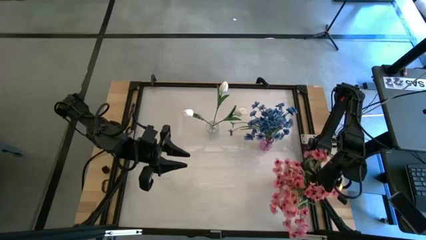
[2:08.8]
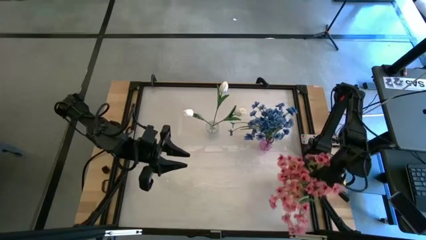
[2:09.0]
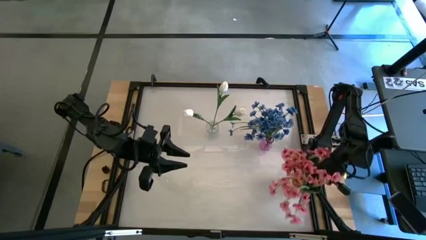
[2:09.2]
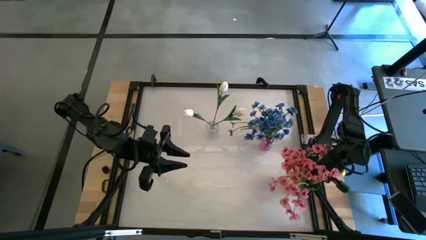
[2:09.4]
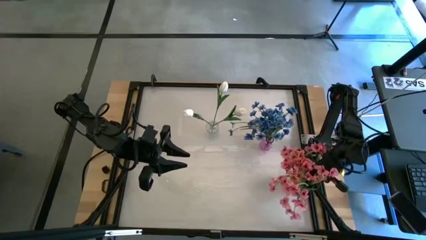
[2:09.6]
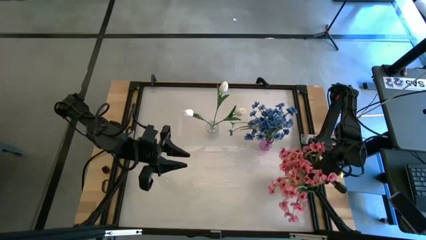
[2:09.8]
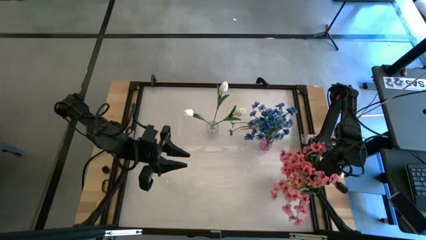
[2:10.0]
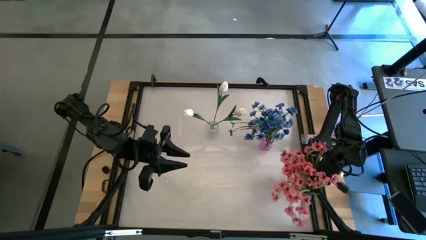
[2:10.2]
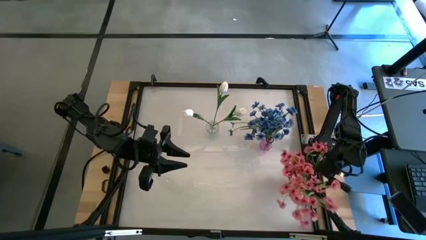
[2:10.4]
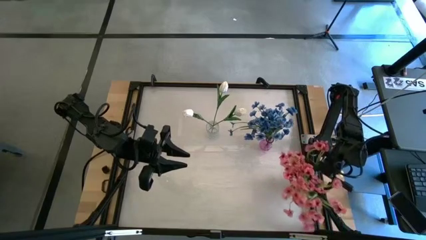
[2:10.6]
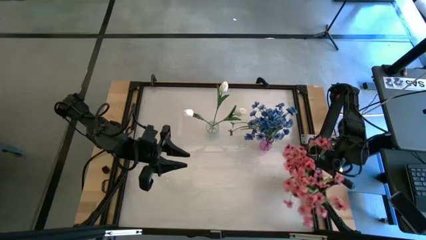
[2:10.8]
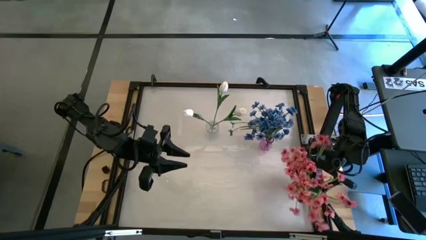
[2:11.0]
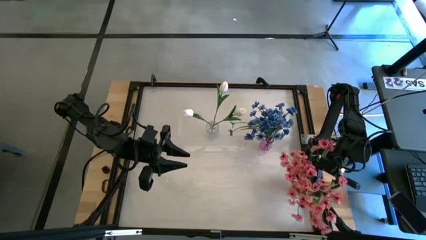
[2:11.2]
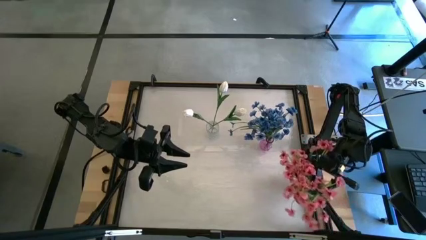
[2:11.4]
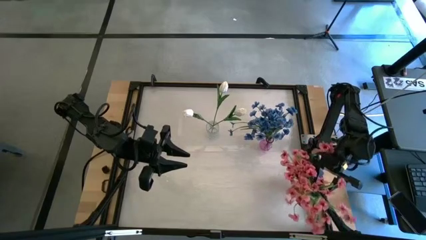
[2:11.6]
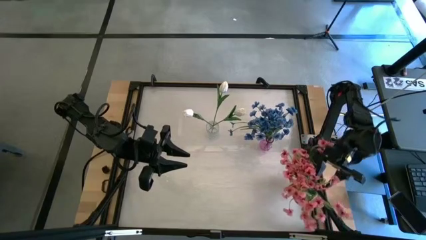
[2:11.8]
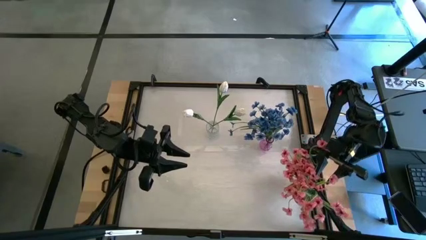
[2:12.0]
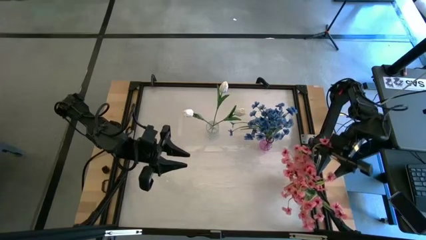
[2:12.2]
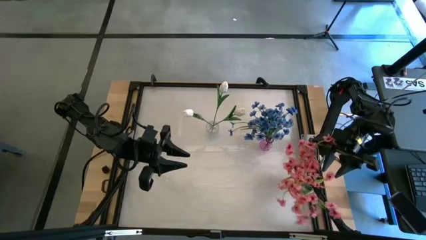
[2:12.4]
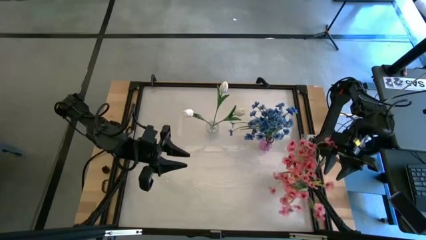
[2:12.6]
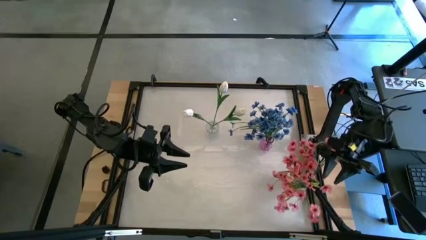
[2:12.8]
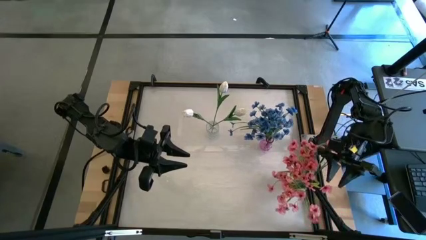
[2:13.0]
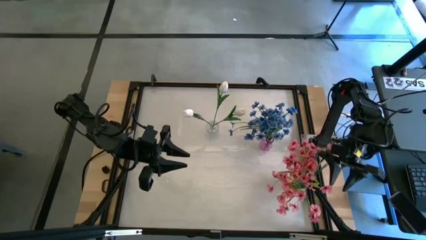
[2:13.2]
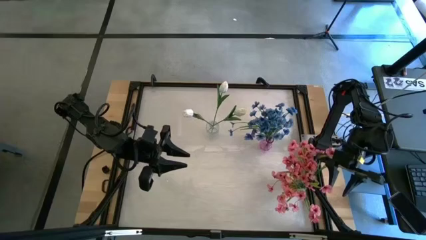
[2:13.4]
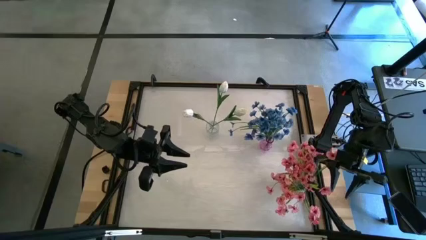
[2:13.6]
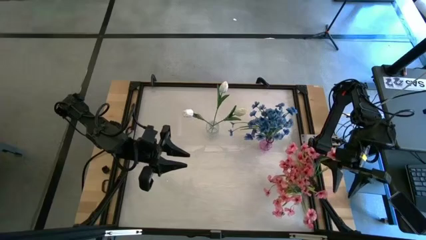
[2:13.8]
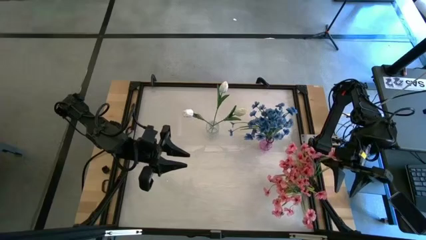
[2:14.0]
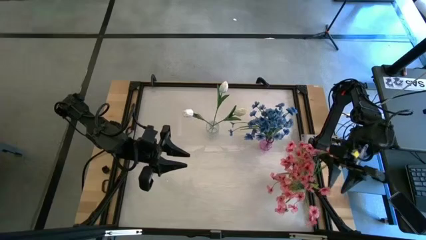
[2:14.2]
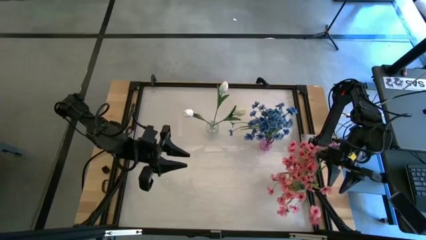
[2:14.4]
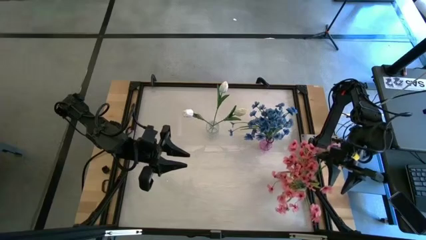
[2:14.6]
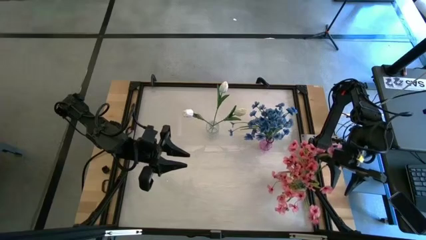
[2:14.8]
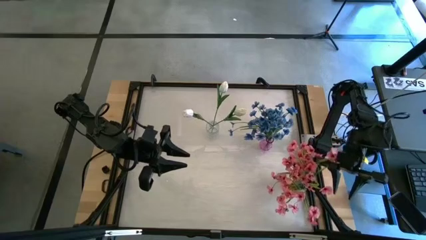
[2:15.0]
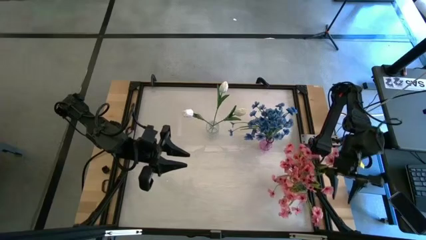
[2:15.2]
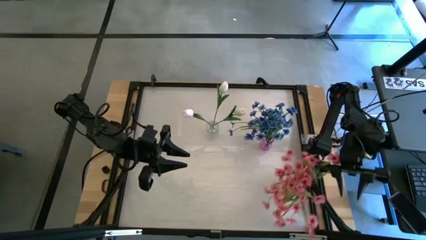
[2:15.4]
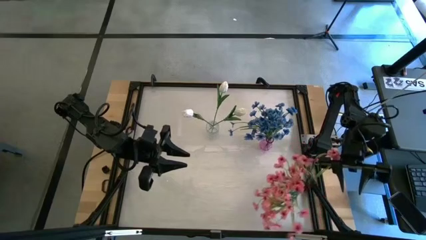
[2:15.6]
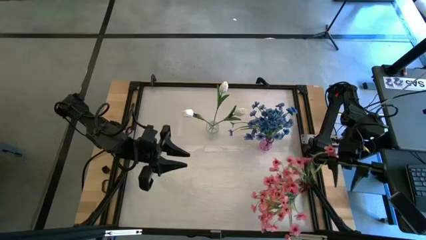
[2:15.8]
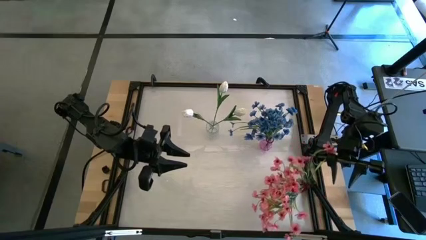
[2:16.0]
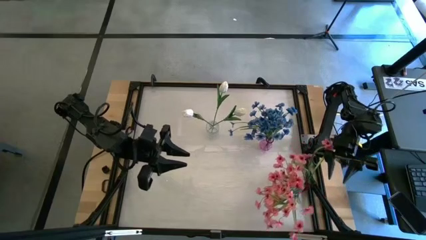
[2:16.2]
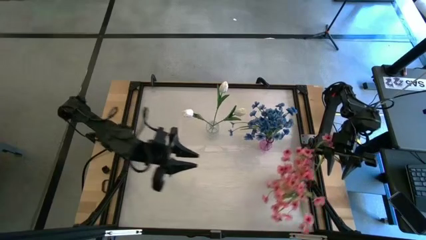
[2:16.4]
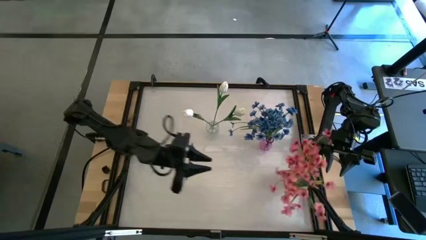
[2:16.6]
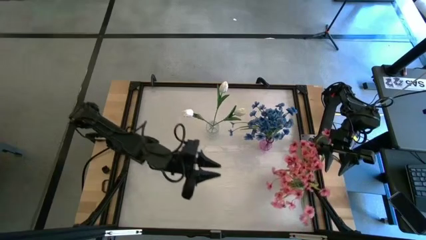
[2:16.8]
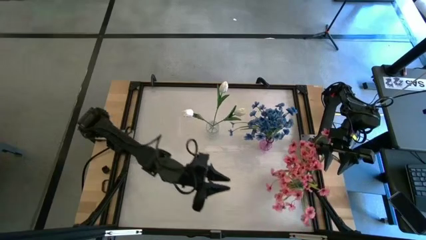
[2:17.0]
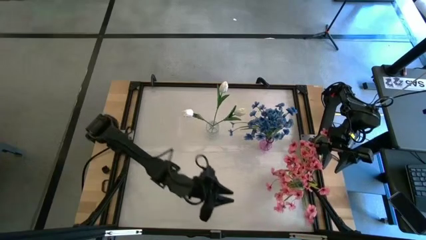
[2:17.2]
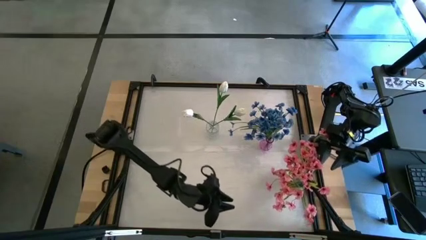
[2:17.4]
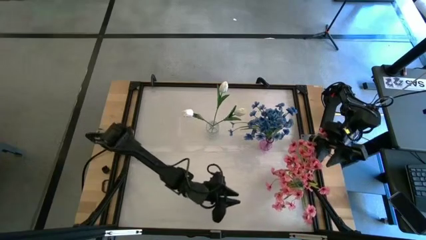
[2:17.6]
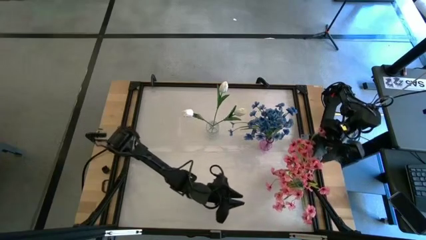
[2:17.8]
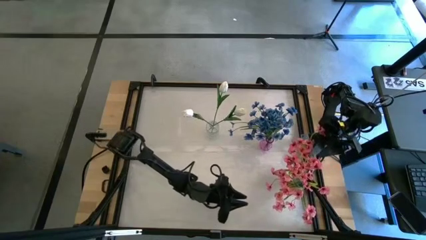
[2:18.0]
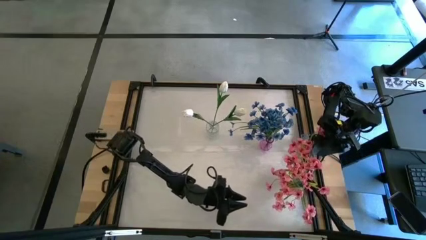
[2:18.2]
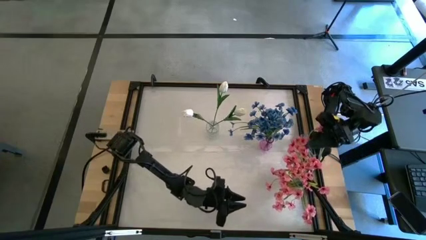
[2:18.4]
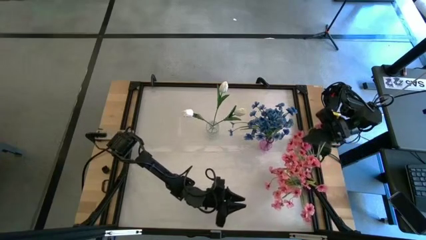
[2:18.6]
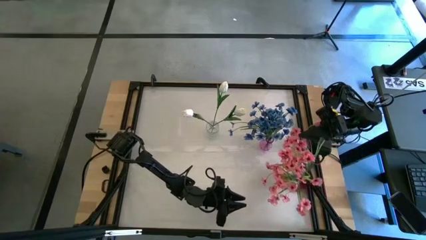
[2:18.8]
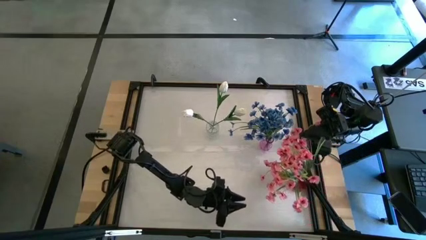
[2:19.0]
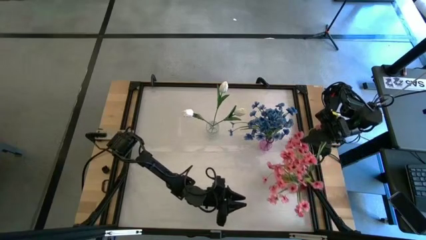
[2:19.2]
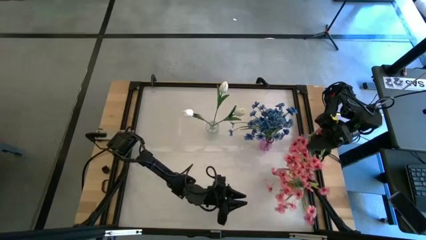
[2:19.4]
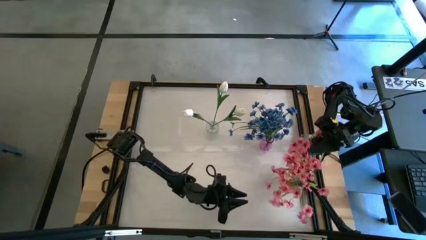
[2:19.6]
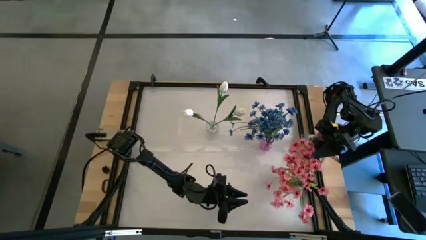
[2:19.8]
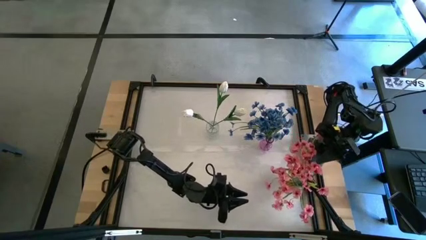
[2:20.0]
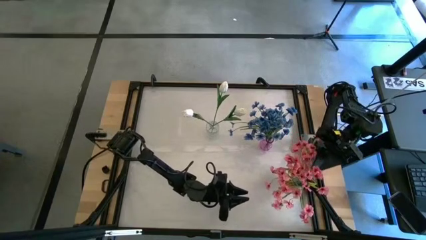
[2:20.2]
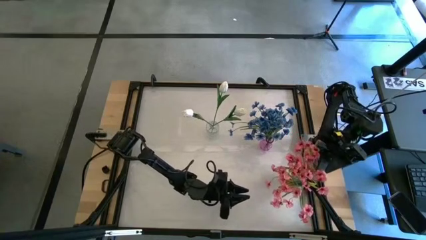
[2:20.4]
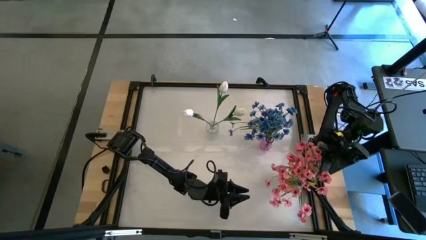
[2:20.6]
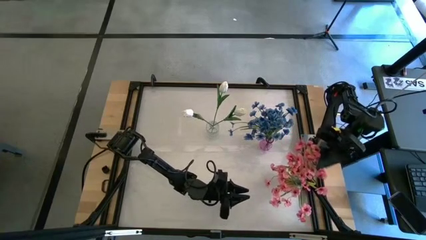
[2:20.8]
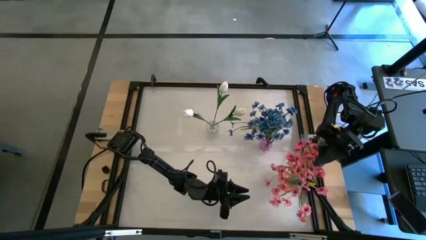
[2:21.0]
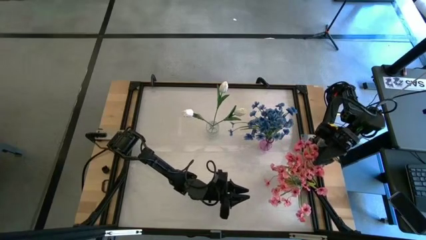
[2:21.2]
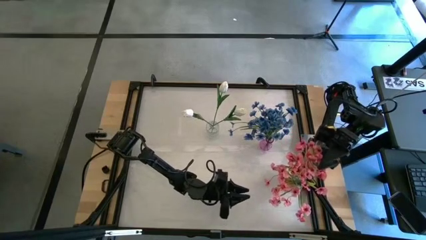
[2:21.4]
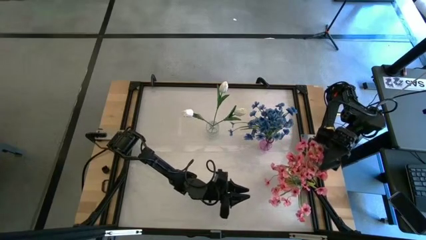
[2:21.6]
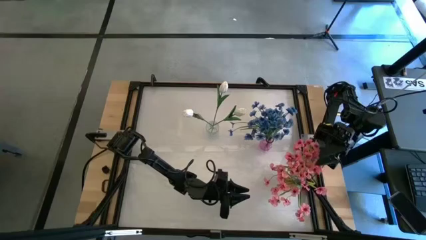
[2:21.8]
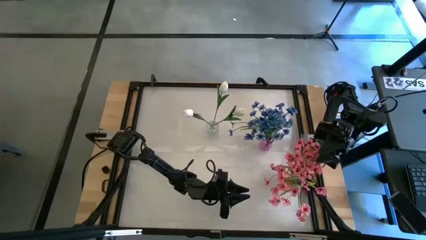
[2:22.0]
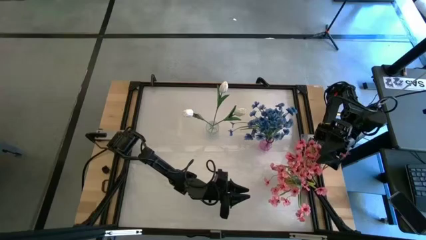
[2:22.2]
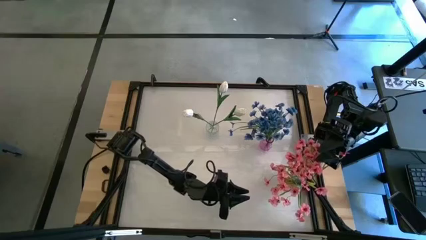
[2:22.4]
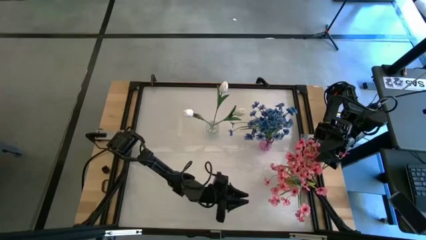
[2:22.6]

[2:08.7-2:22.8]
Task: Sort flowers into vase by color
Put the pink flower into the red vase

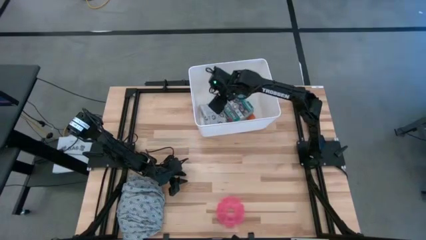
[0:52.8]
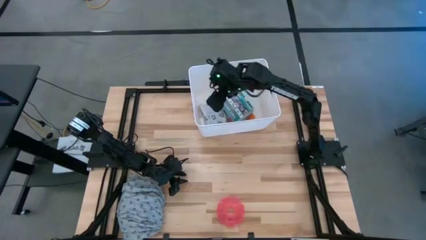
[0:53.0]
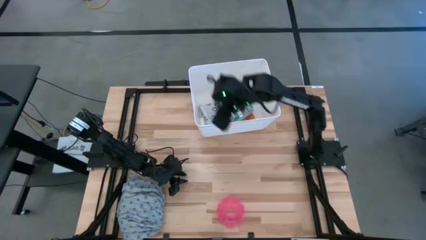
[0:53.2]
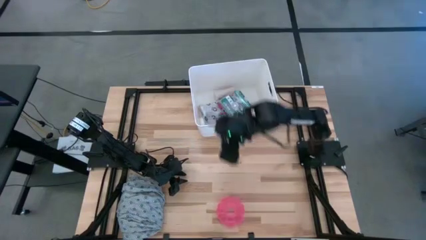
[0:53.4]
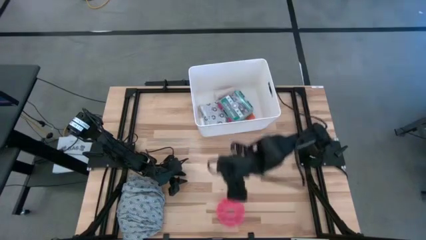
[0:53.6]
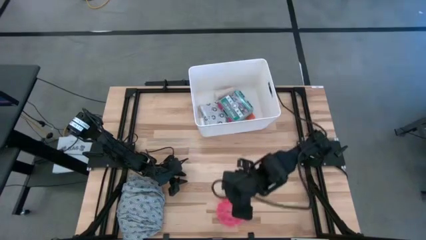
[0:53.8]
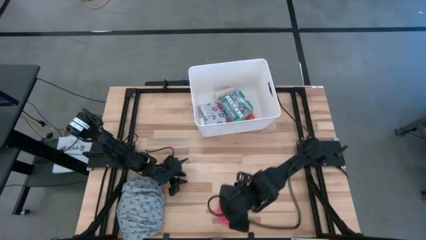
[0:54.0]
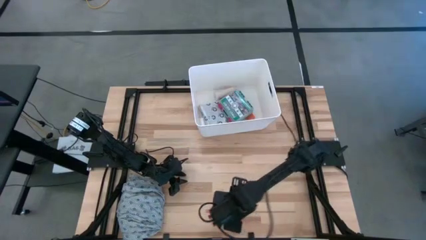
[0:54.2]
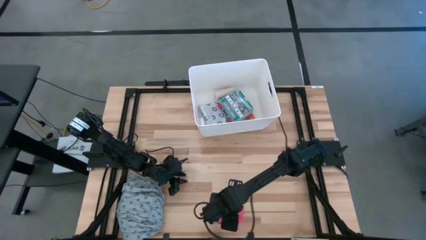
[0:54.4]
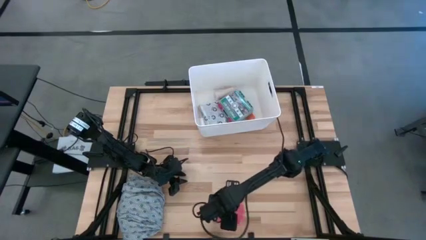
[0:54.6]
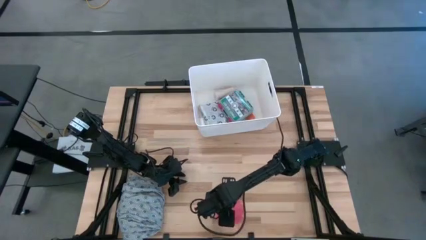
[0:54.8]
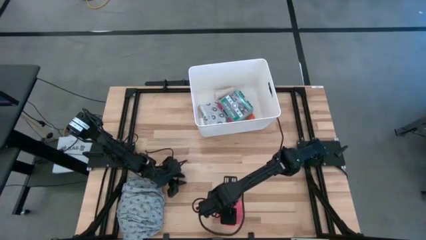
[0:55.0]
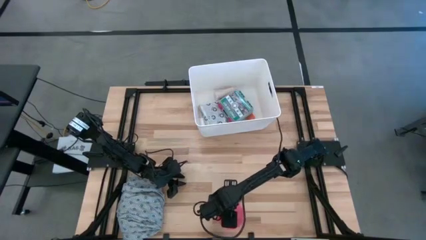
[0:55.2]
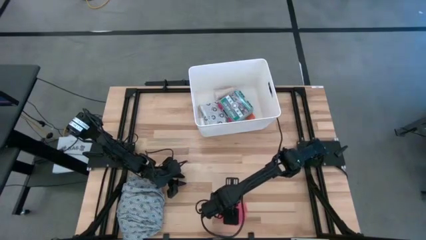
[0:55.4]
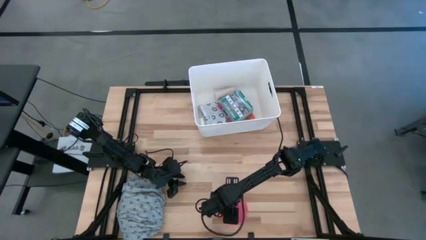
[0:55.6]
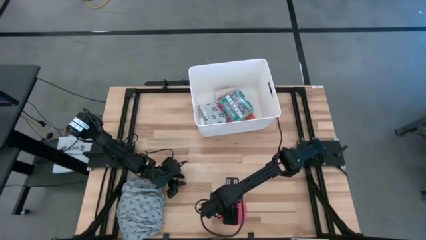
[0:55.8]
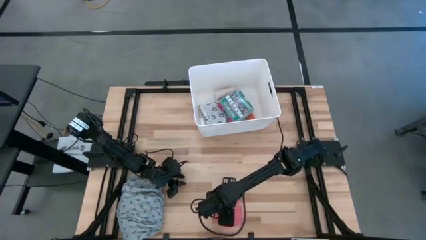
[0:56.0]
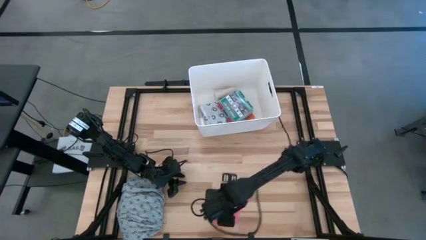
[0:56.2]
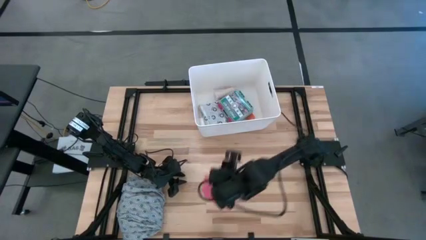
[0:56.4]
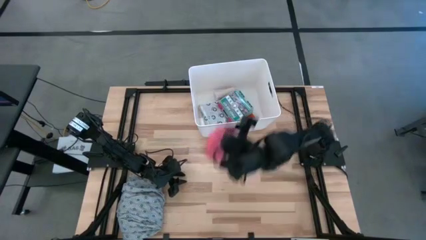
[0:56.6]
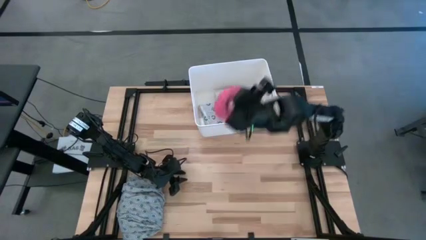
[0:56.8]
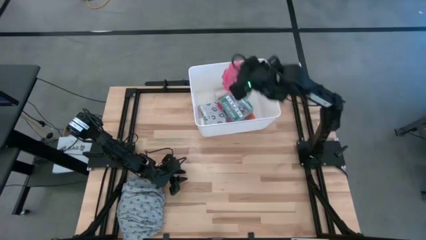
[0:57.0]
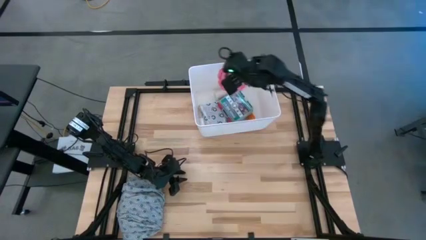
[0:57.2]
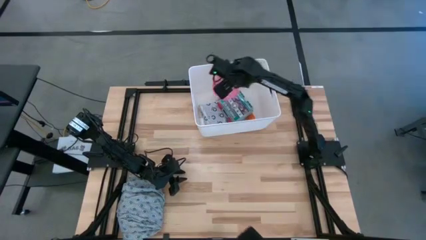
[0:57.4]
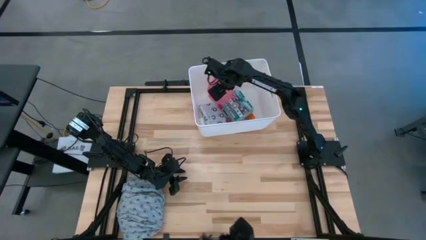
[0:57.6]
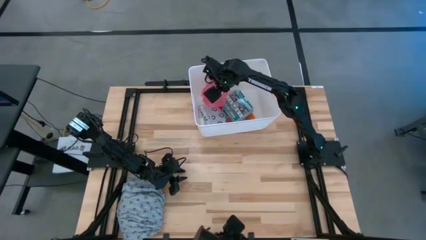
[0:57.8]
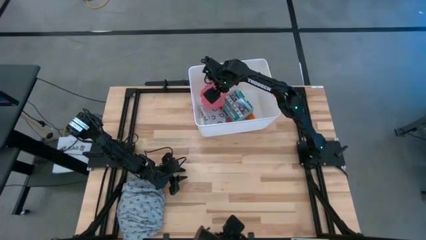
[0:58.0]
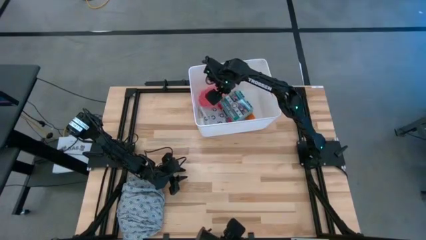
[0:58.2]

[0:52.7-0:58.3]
Task: Pick & place medical supplies in basket/bin
Put the medicine organizer into the white bin
